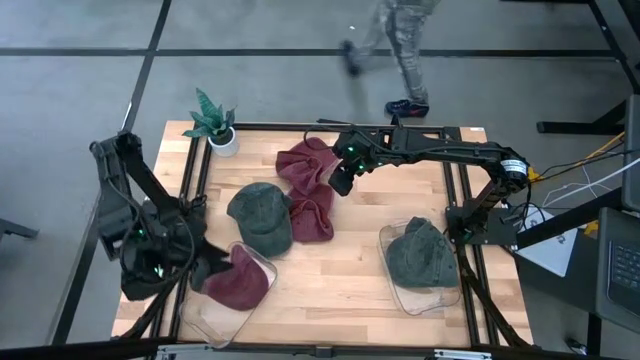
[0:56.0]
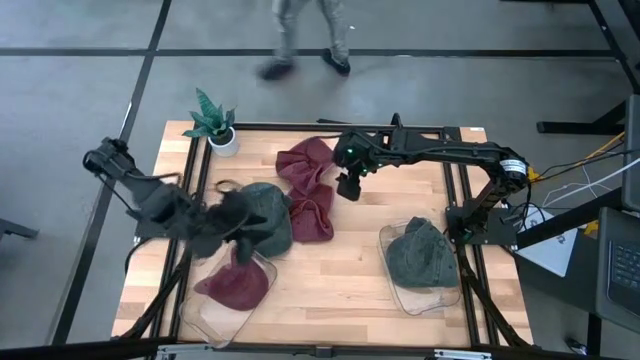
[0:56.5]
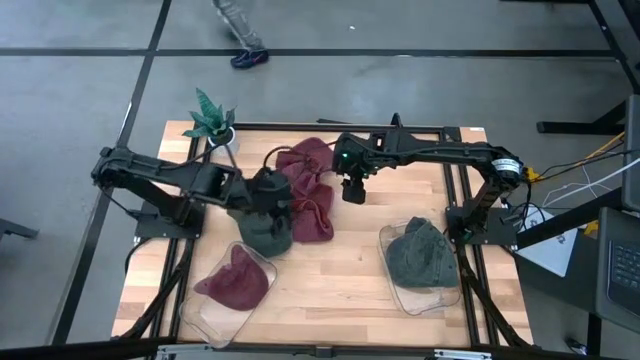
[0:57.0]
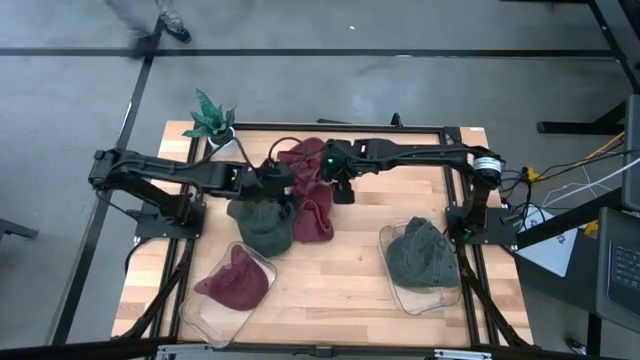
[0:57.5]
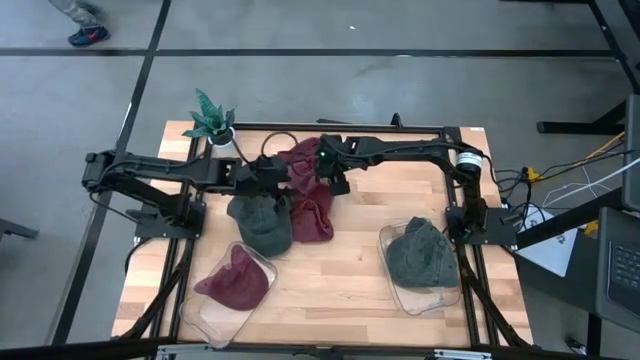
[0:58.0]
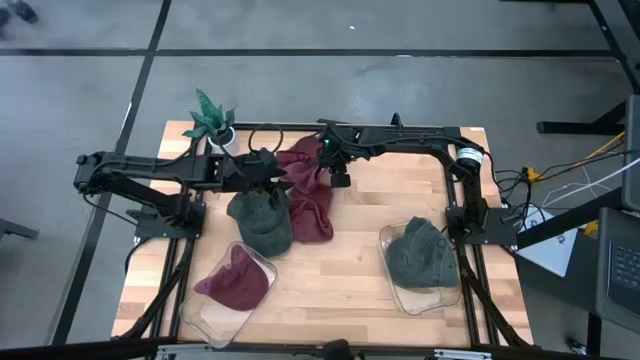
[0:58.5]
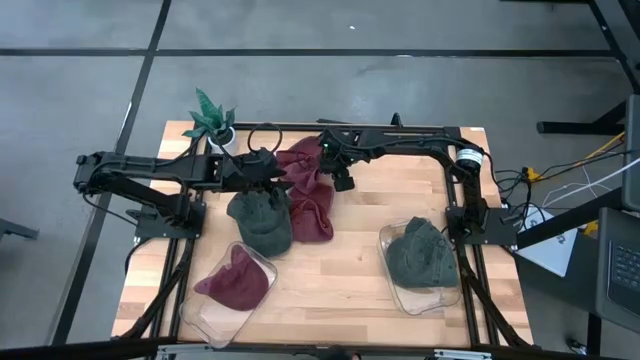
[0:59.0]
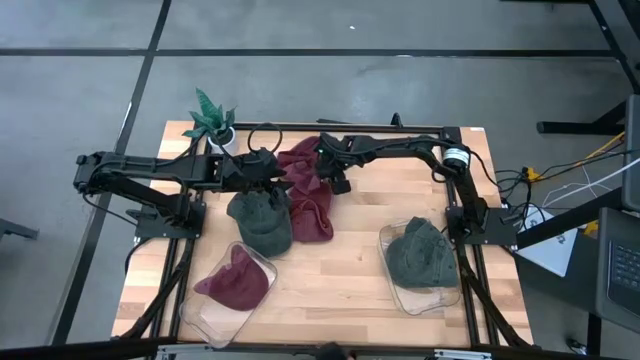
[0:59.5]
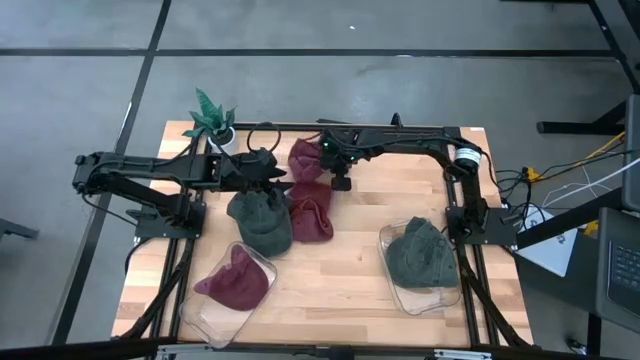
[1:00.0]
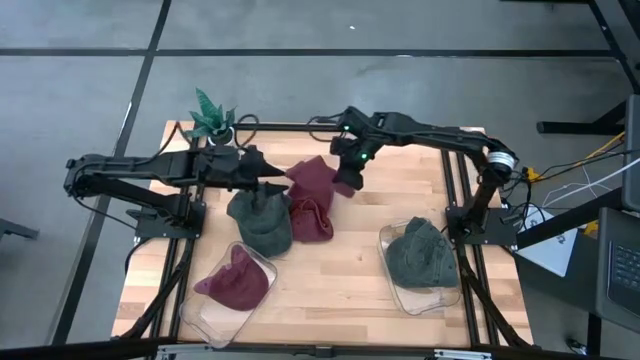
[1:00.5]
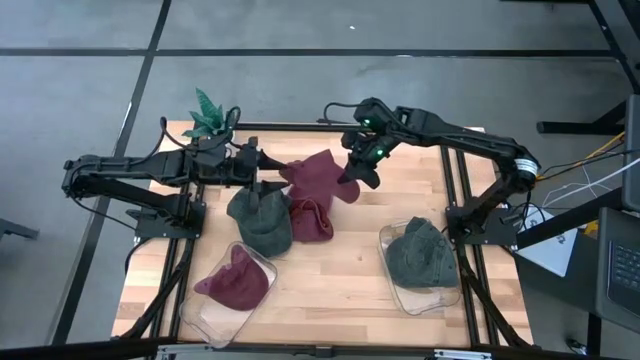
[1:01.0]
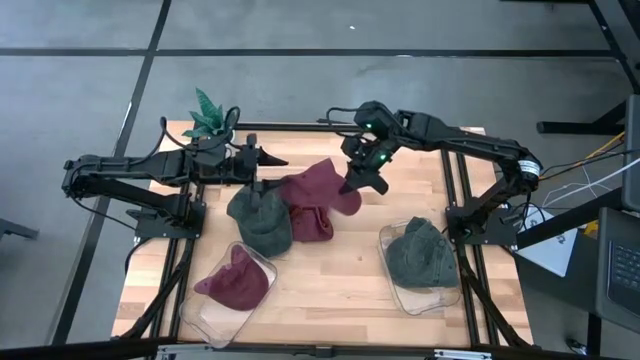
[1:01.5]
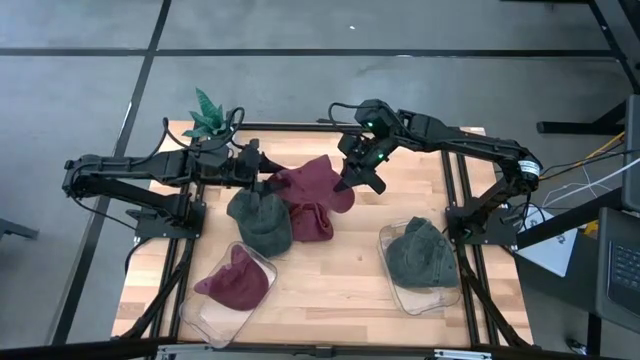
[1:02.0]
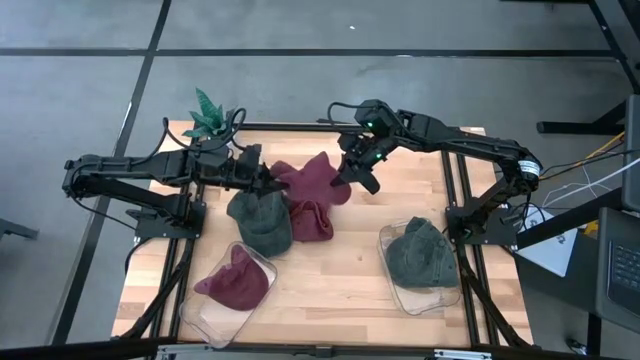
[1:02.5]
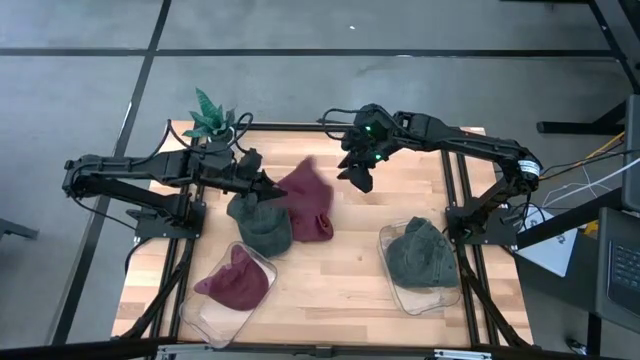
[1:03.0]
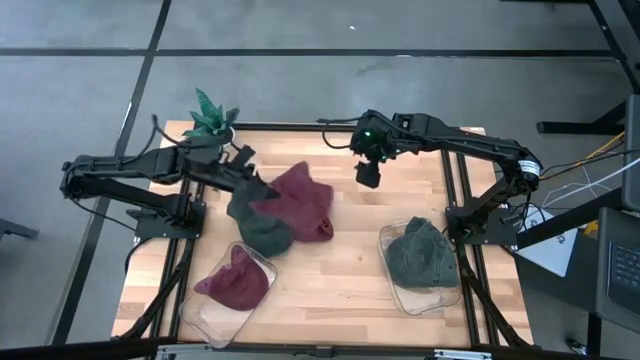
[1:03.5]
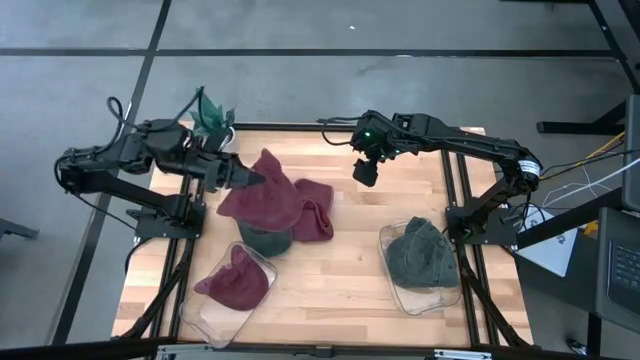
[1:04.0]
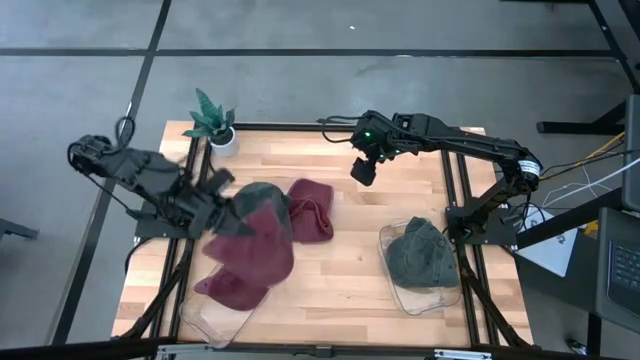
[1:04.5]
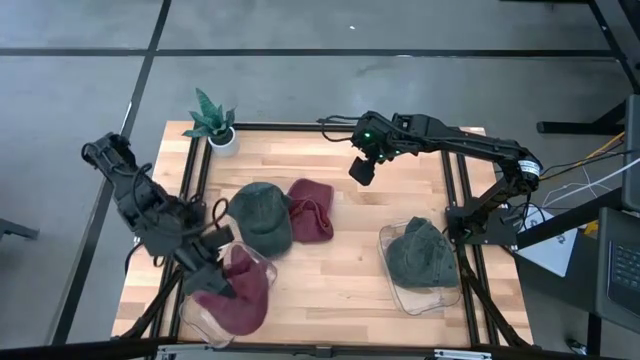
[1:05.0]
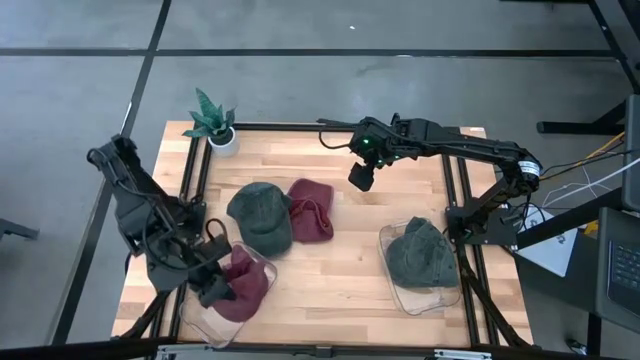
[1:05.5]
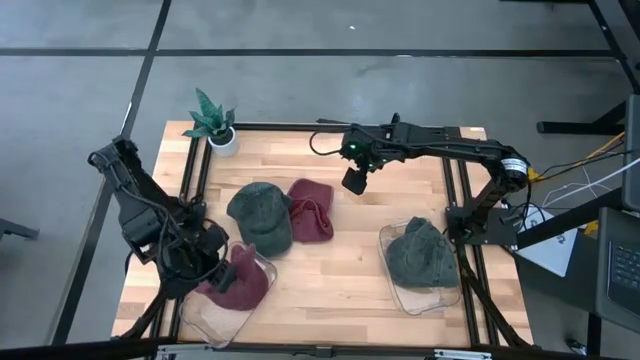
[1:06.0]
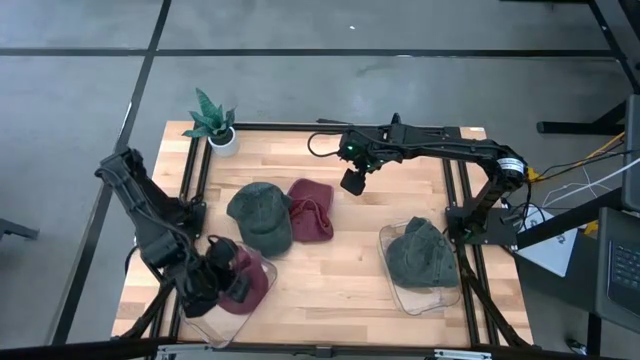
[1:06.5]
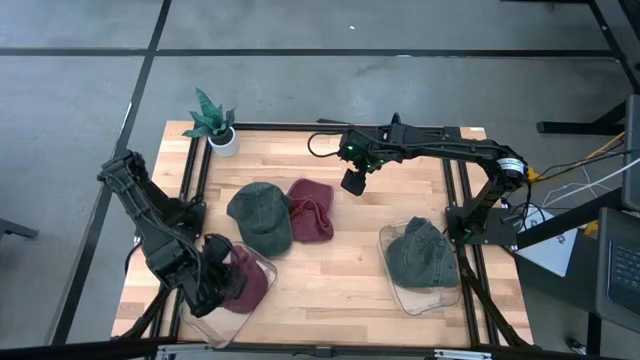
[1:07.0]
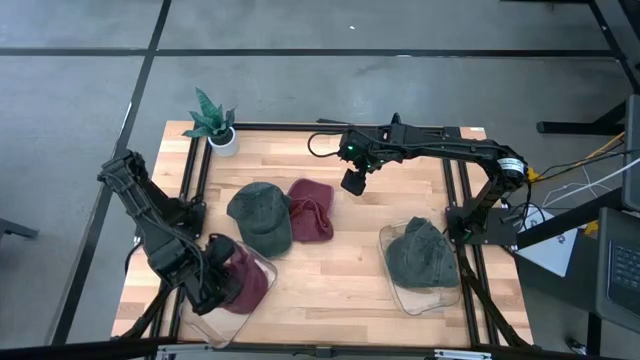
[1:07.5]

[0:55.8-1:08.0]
Task: Pick & Place hat
Put the top red cap into the left transparent bin

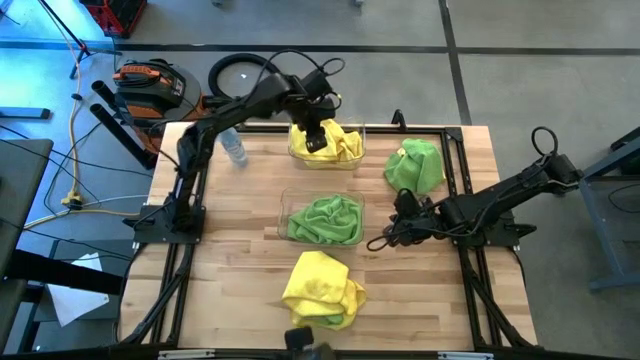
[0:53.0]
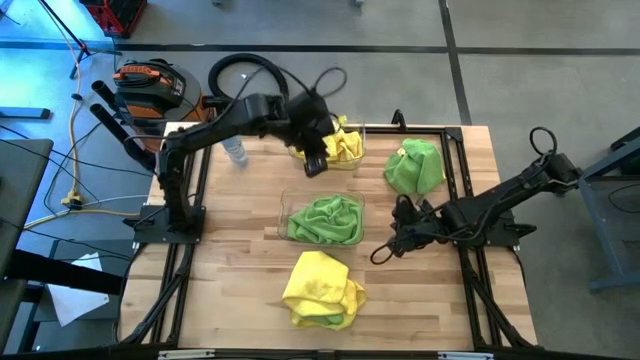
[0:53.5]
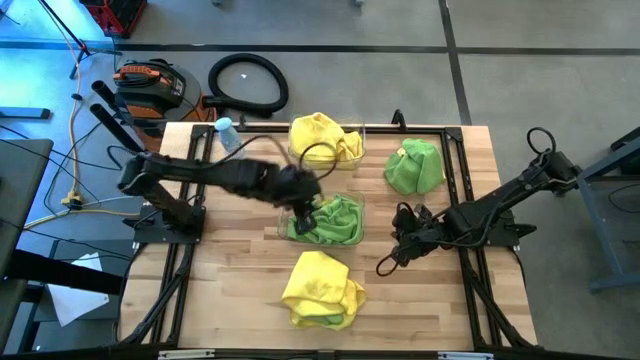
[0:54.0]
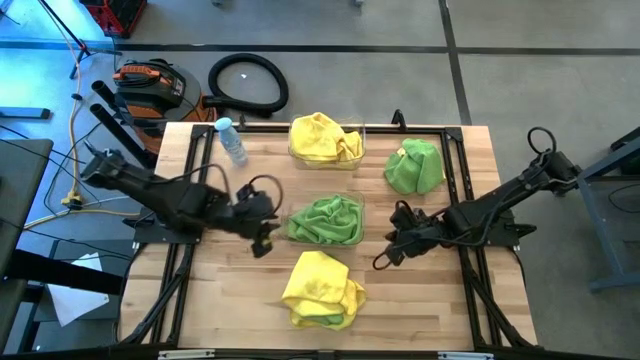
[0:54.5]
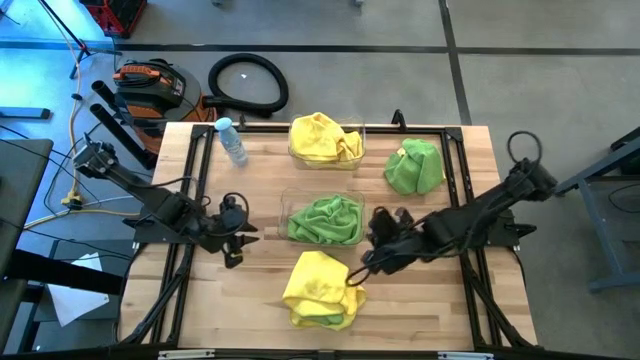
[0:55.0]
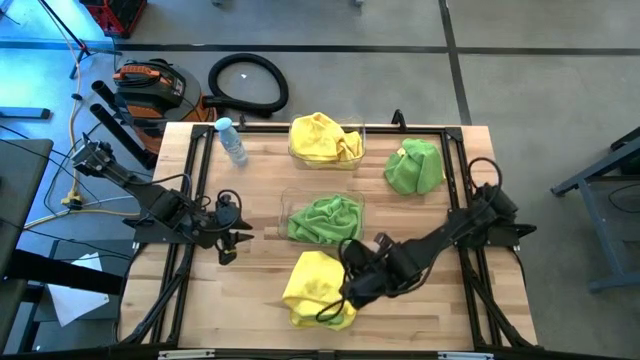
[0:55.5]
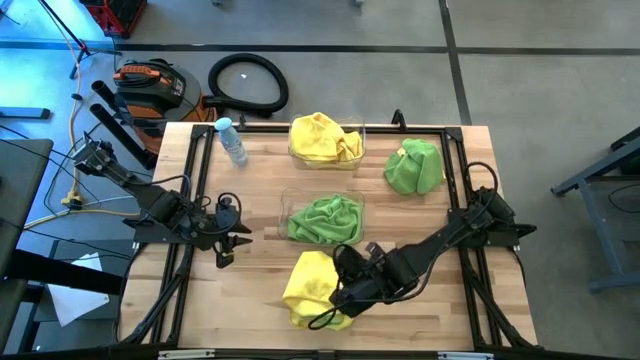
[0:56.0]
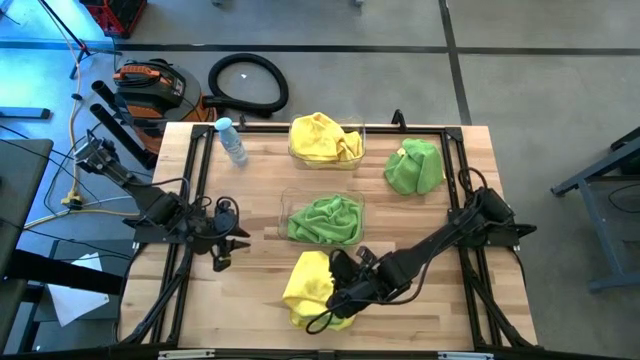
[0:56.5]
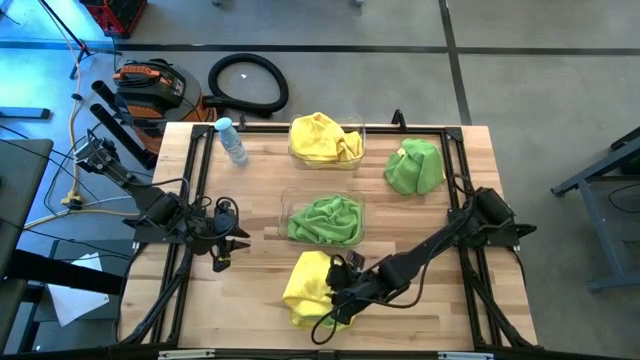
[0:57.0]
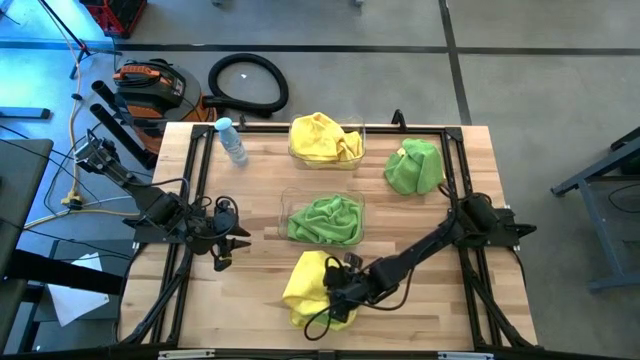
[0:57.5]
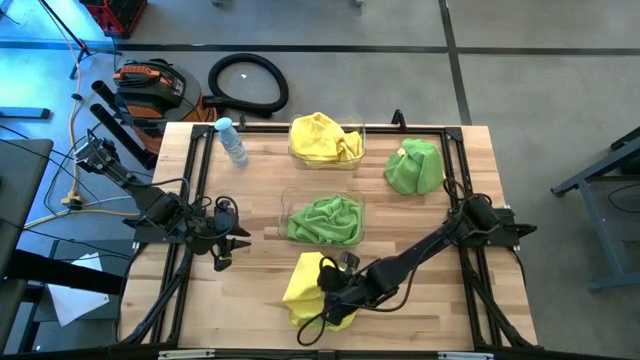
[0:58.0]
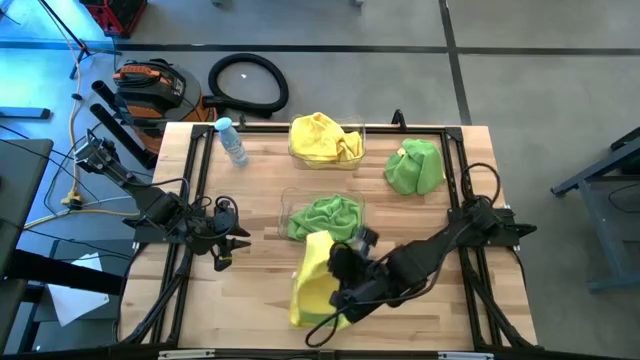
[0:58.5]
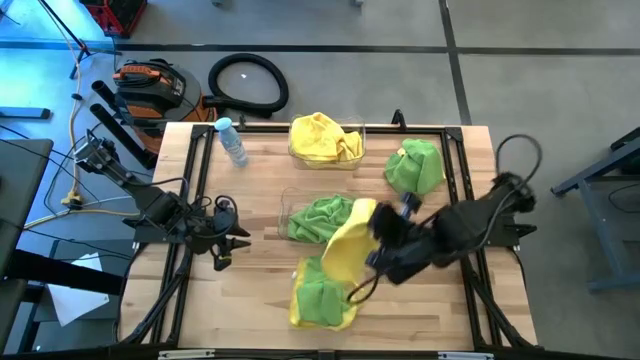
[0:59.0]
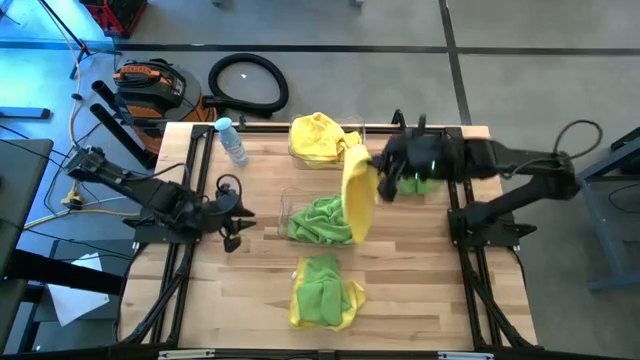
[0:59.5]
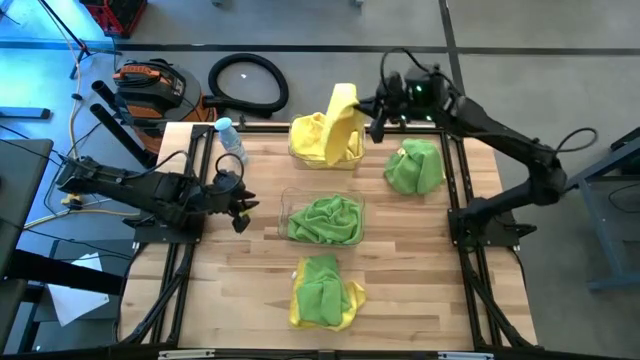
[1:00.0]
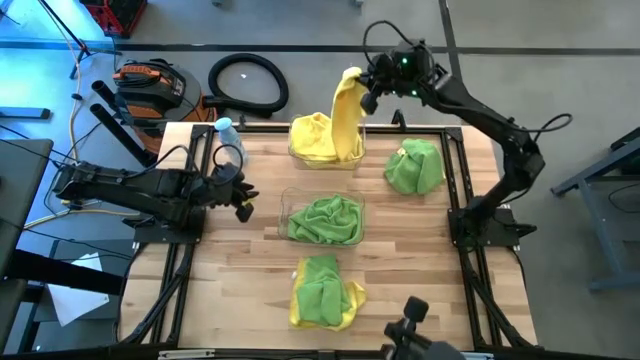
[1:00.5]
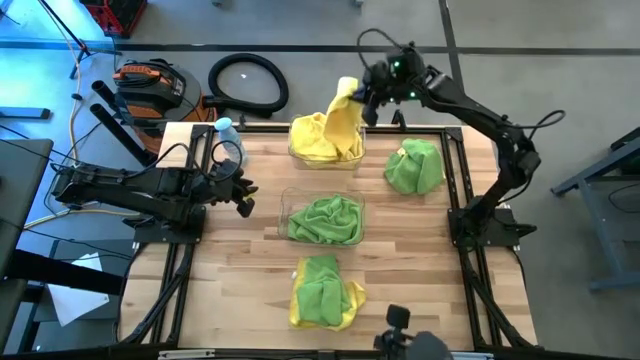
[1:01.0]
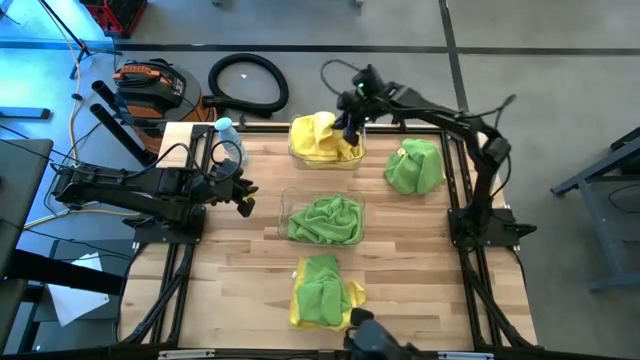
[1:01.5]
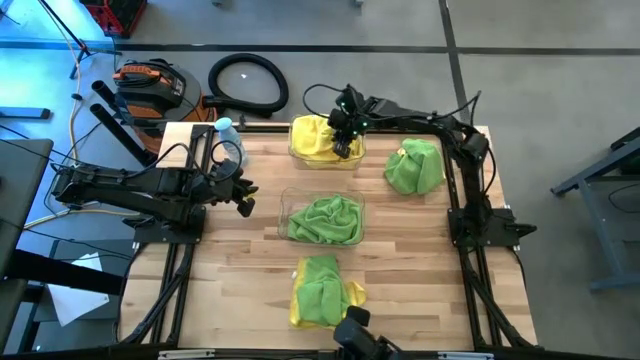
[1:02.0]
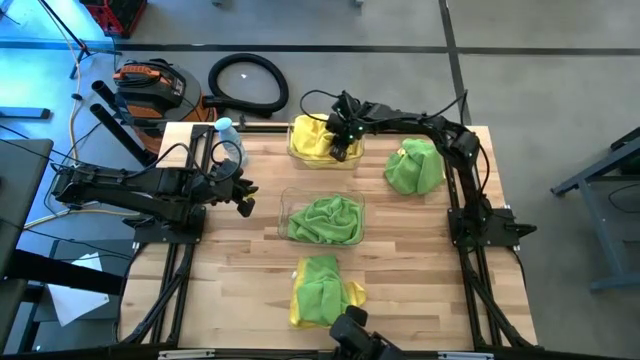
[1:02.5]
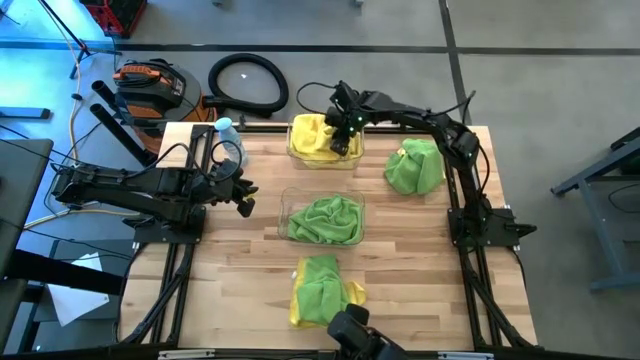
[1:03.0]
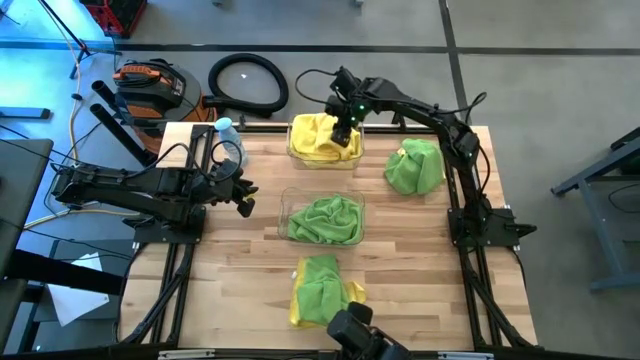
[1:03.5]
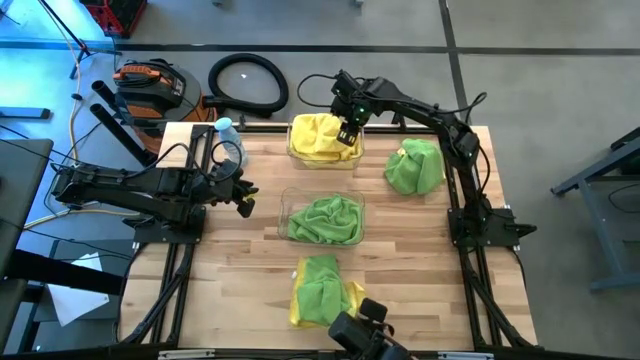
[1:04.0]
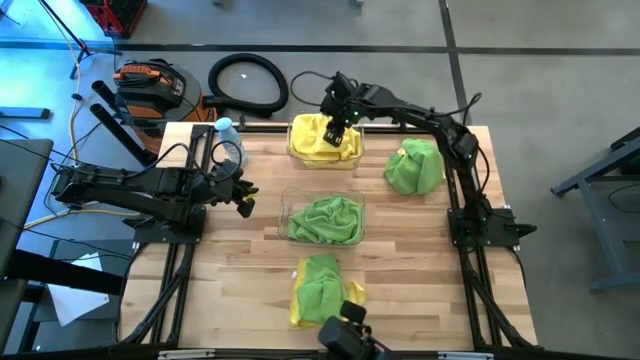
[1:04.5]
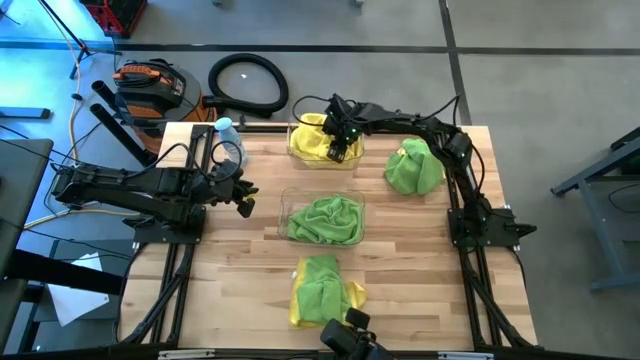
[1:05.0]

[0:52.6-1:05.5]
Task: Sort microfiber towel by color & place in baskets
Put the yellow towel into the top transparent bin
